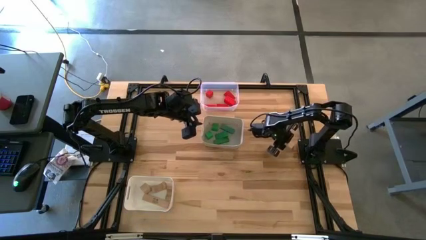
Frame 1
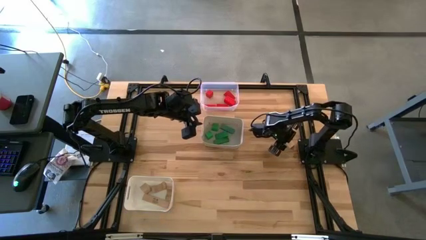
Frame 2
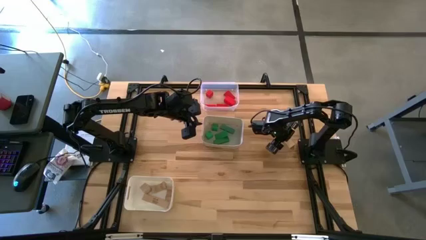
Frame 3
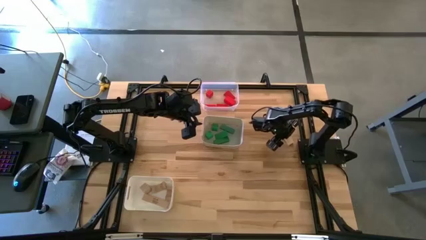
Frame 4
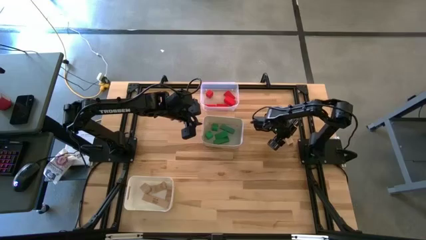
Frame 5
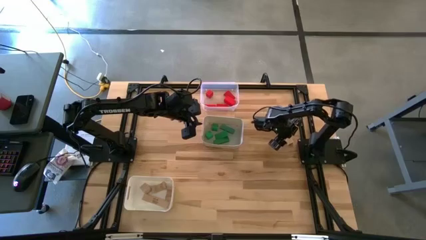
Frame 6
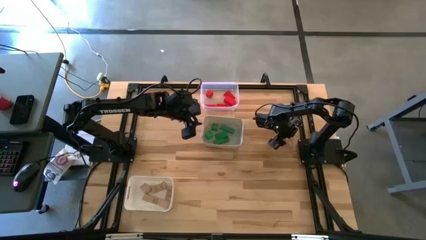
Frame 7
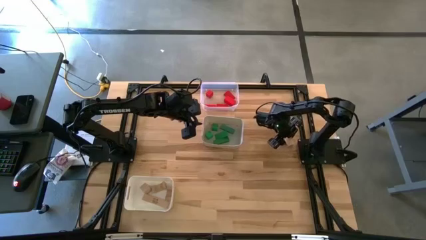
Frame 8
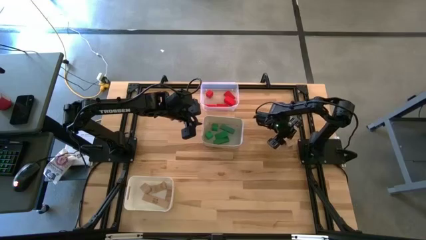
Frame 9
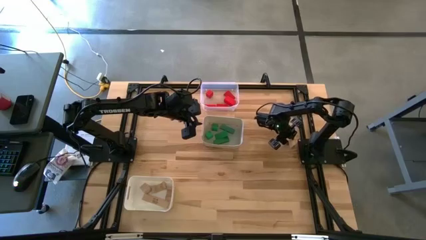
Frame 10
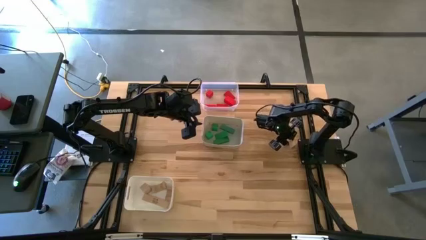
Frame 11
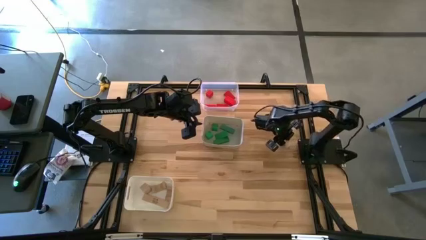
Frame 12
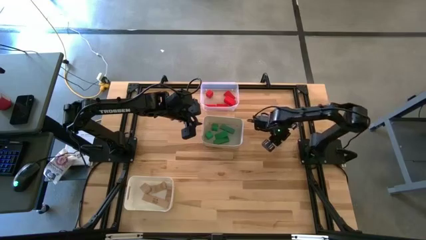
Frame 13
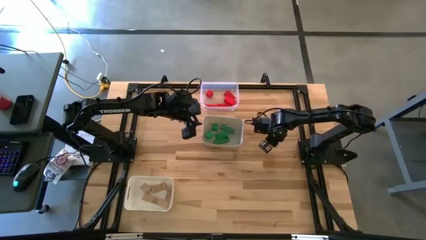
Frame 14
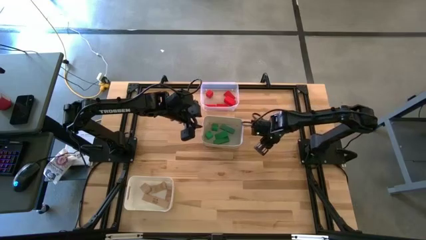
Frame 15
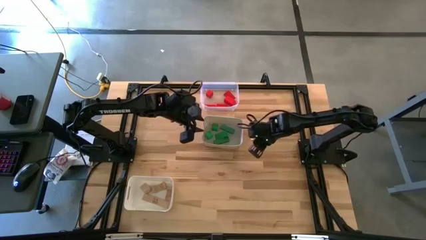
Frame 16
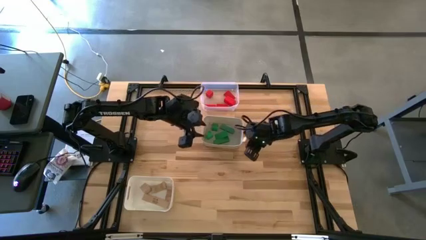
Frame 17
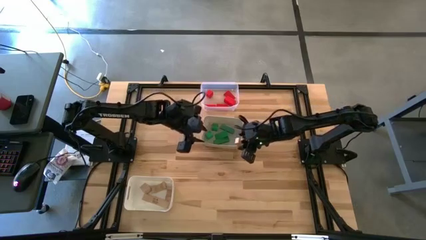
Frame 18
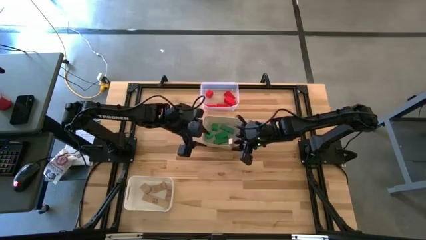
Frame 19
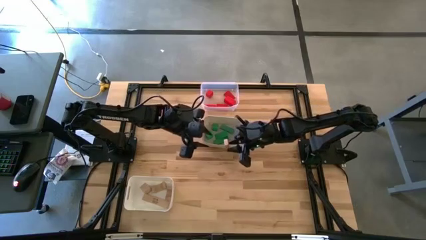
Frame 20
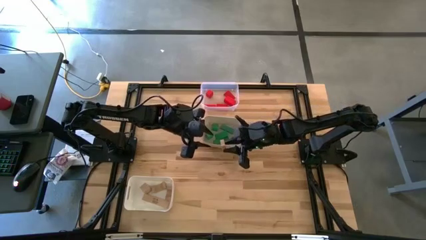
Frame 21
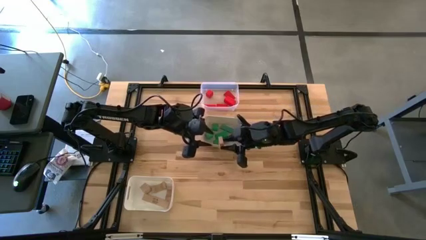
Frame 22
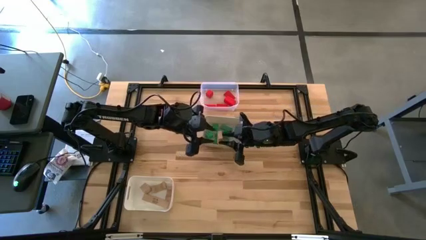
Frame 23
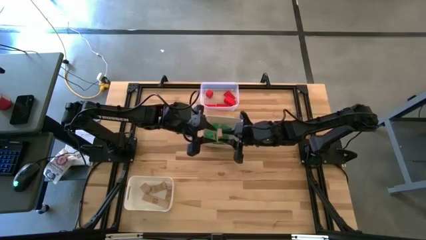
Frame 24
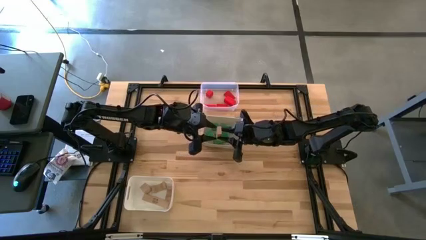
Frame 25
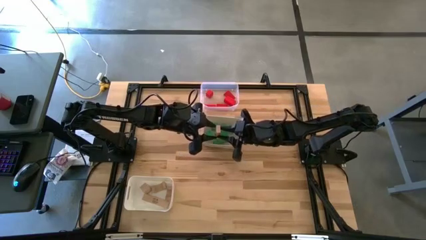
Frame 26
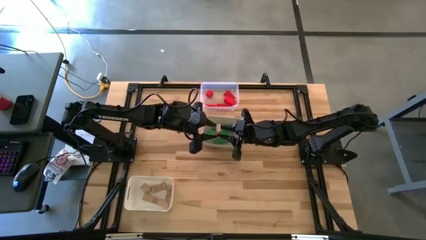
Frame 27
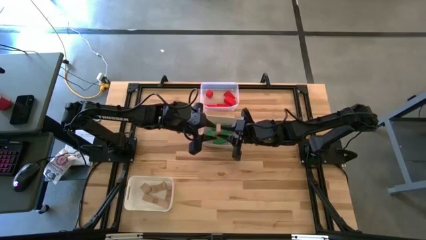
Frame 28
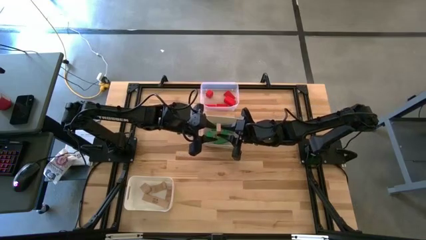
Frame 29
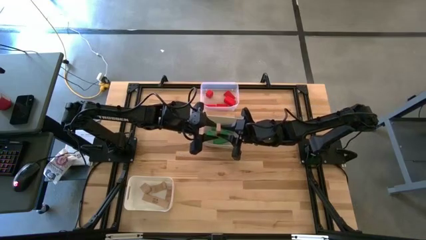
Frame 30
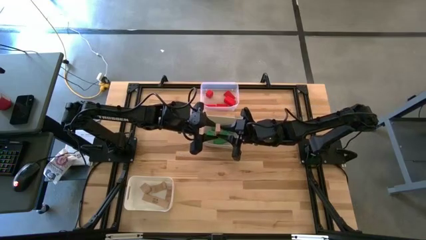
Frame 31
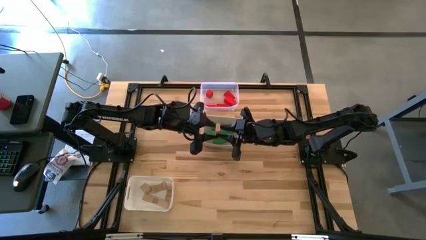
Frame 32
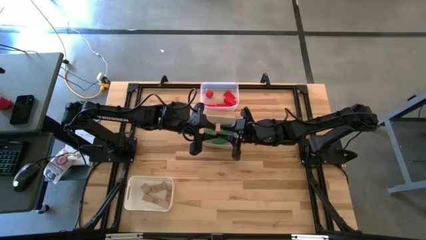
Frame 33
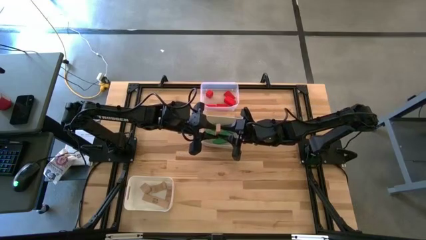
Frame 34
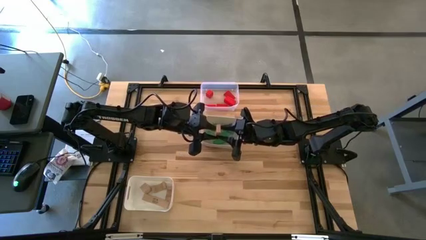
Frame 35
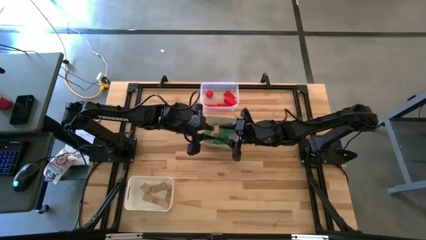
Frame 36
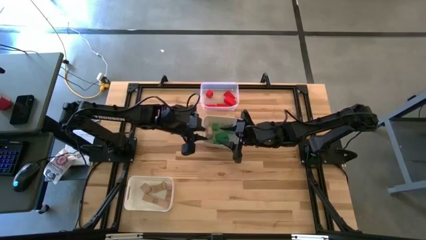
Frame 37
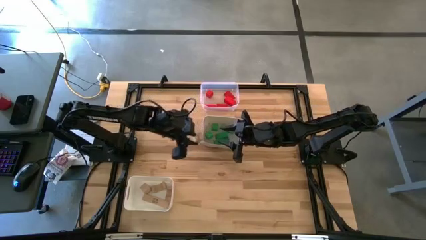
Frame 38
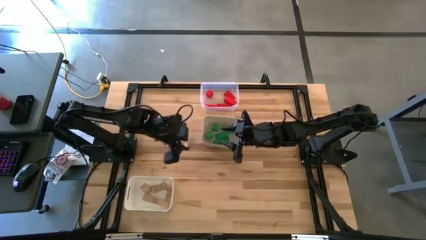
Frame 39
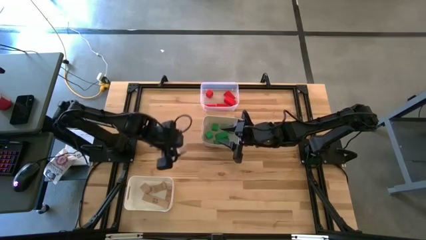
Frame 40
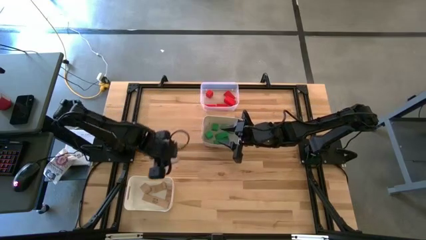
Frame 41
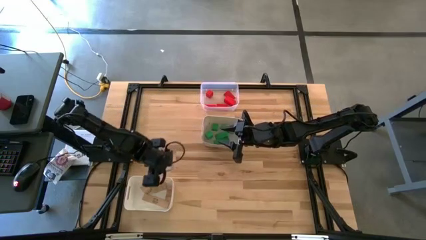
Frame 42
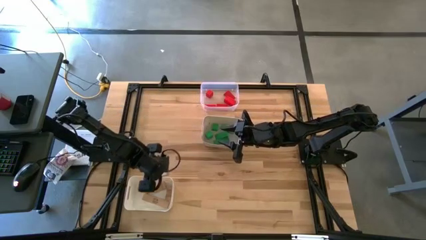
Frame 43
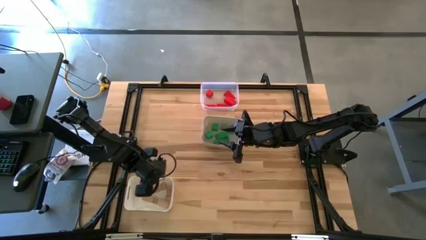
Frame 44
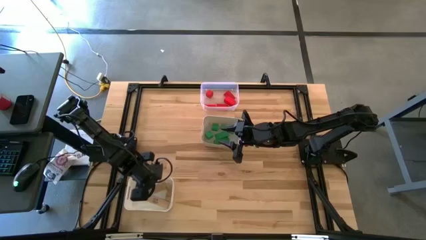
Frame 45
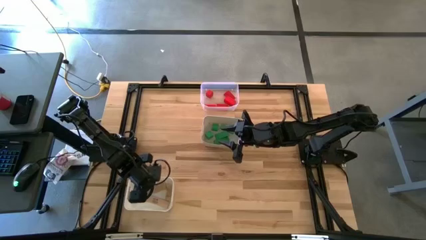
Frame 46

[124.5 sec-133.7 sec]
Task: Sort & place blocks by color
Put the brown rectangular block into the bottom white bin

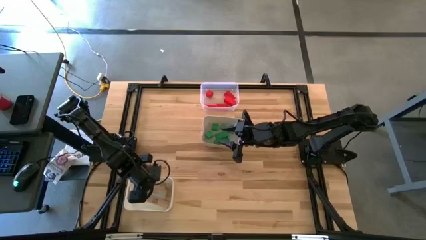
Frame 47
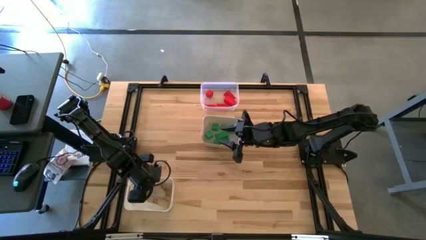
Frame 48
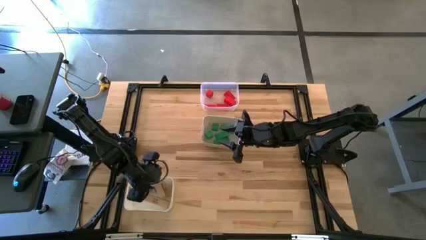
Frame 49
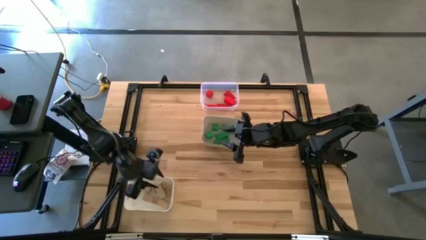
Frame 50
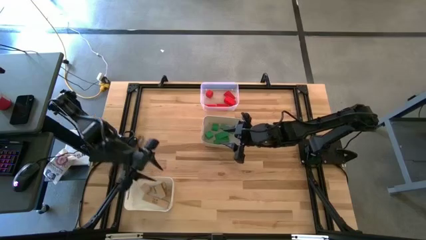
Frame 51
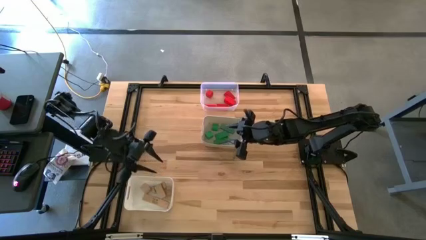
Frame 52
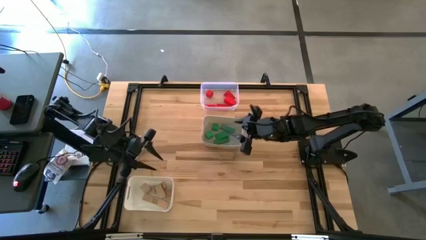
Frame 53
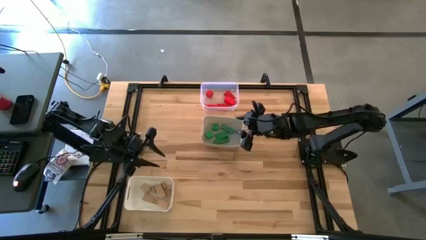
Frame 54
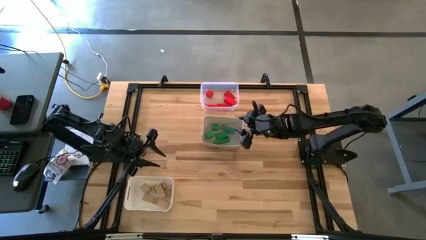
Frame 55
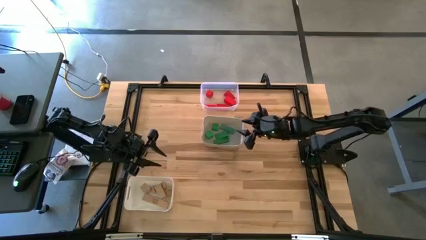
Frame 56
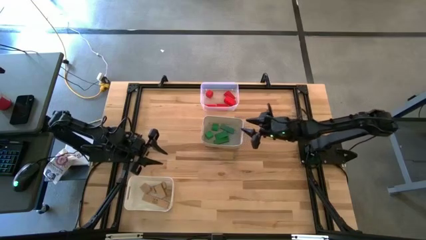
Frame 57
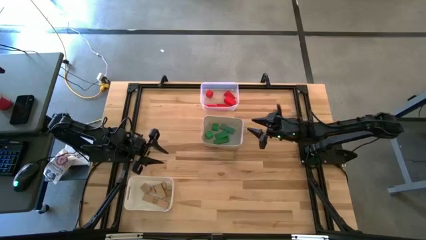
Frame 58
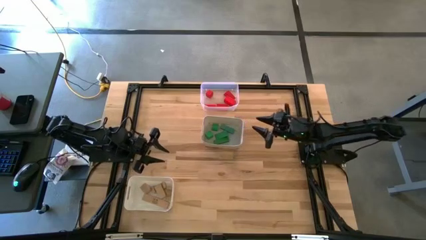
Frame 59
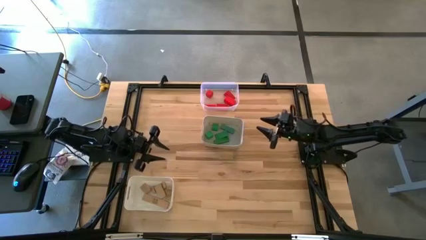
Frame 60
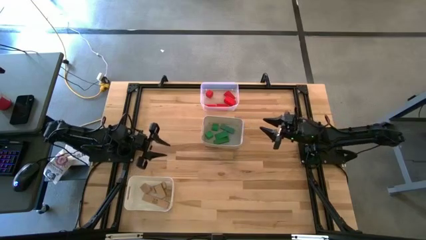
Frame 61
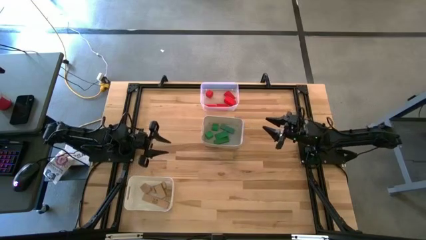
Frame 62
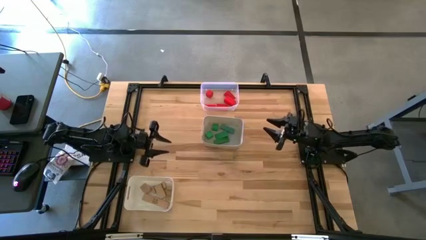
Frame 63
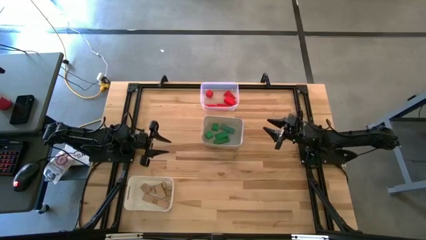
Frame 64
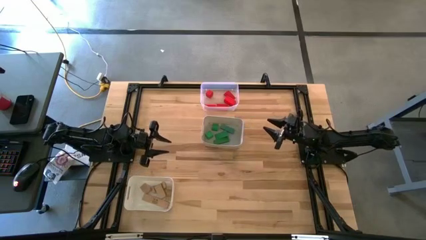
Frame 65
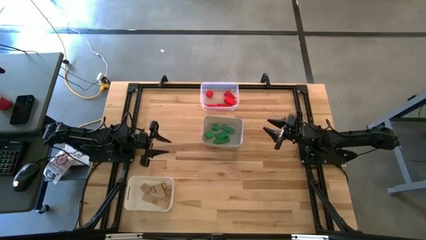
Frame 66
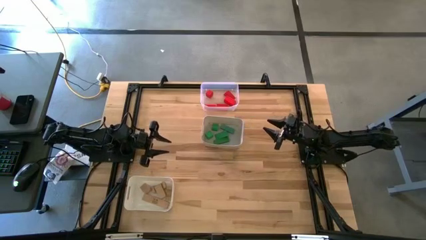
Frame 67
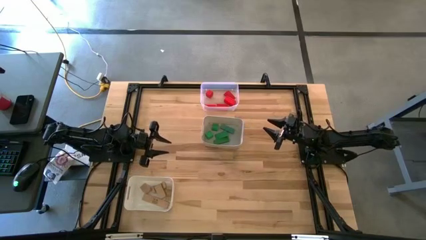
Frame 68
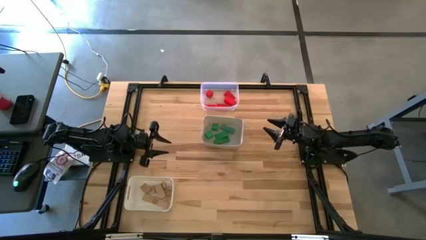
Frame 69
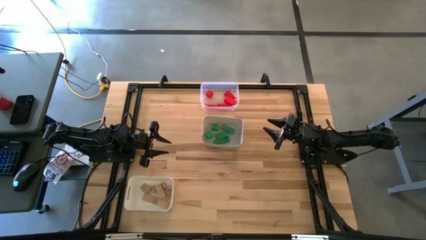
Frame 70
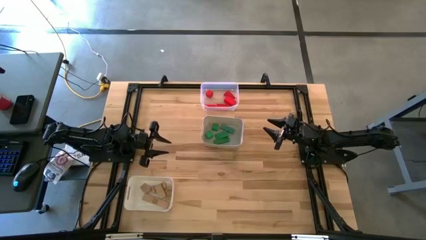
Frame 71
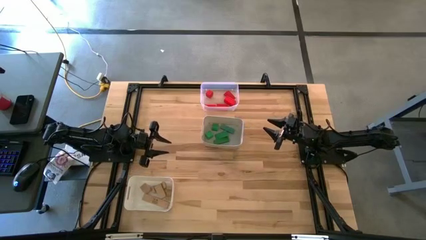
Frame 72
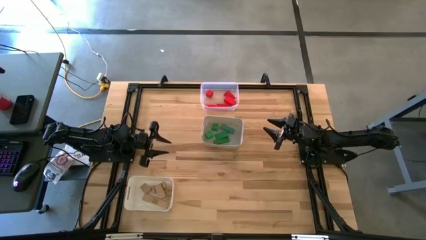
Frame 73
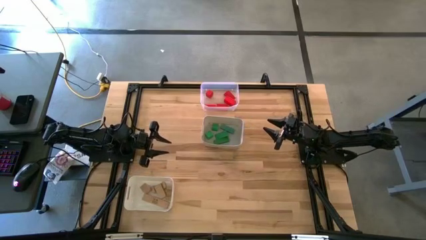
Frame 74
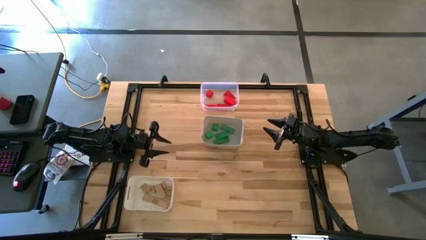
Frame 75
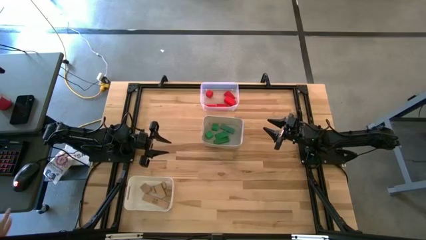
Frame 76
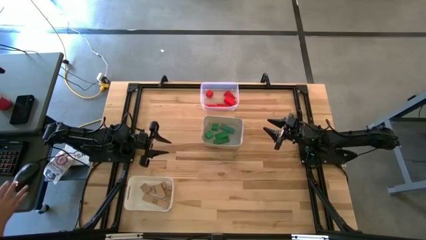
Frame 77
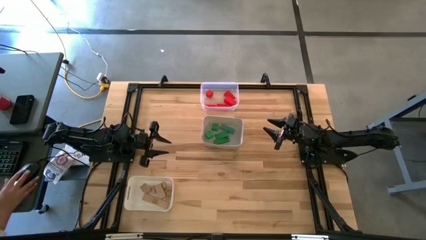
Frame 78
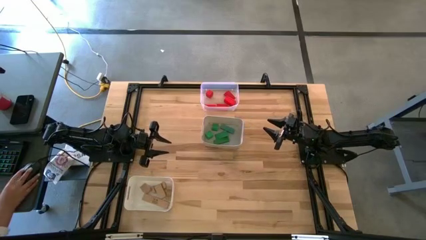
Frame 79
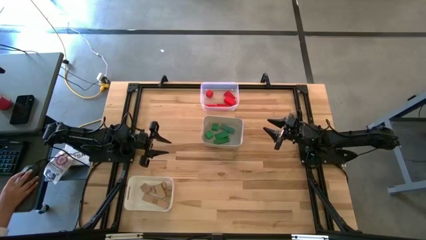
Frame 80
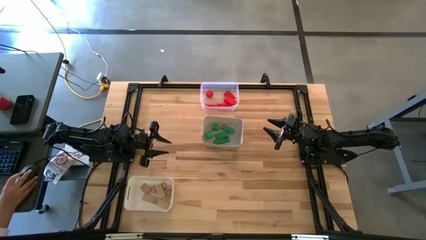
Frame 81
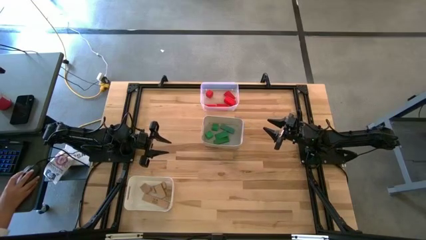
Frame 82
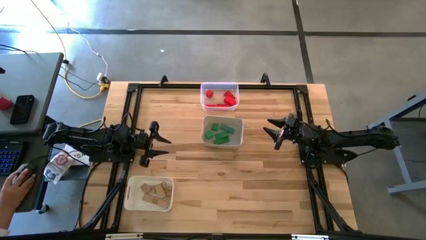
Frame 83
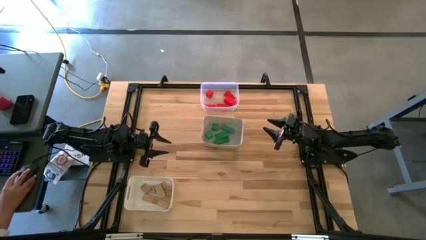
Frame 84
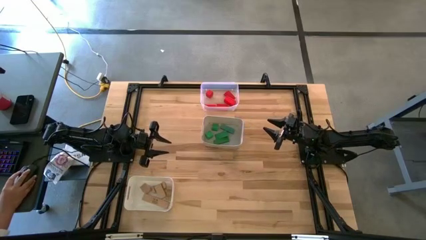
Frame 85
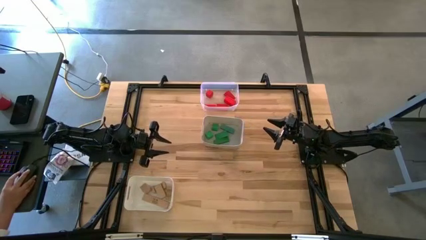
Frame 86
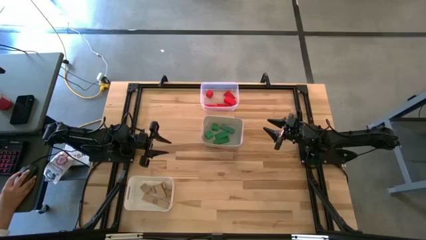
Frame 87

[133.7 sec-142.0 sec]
Return to home position
